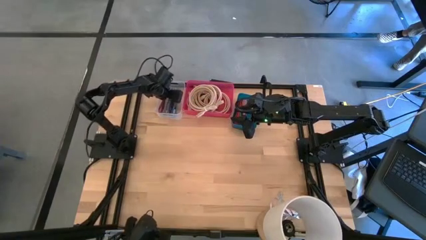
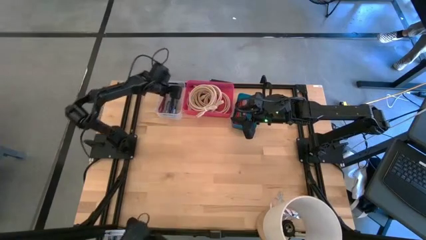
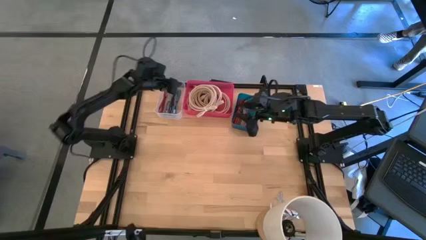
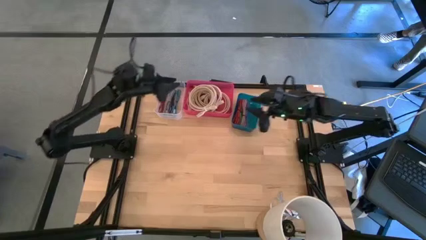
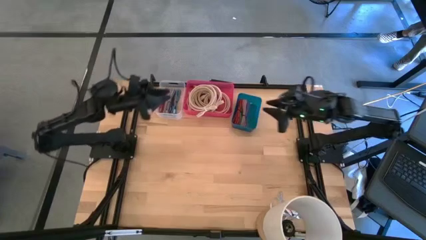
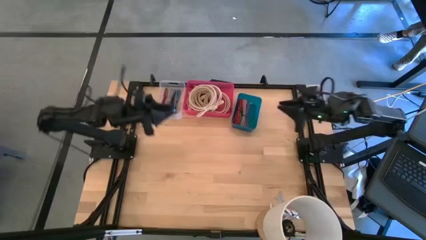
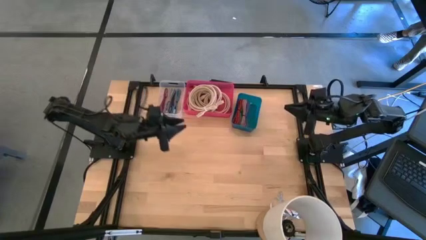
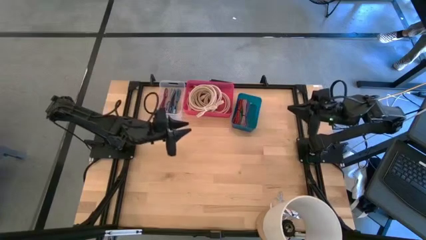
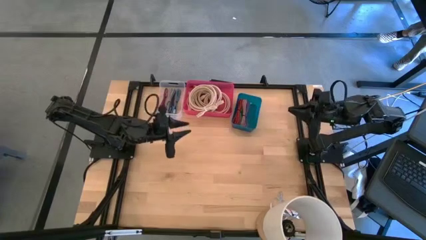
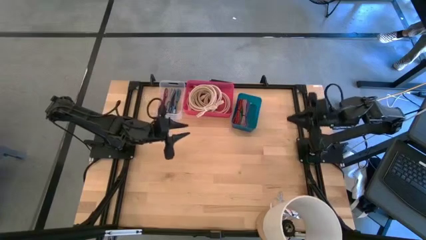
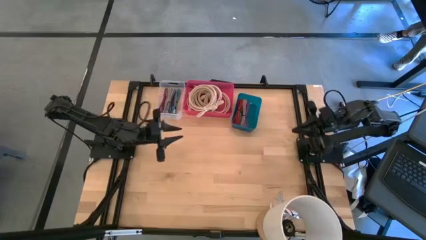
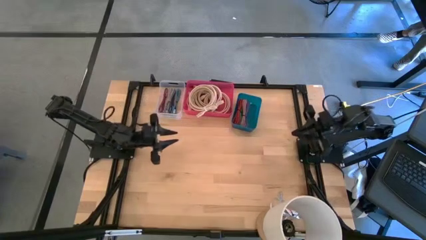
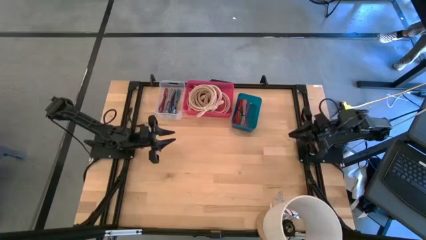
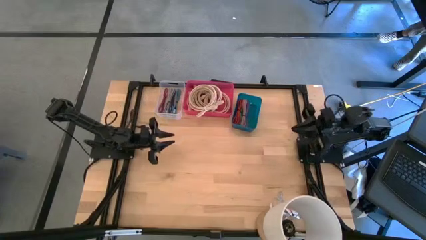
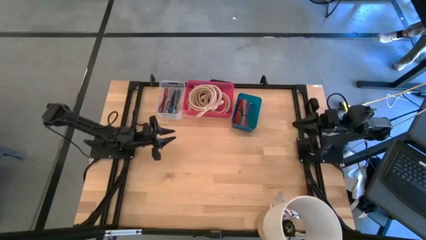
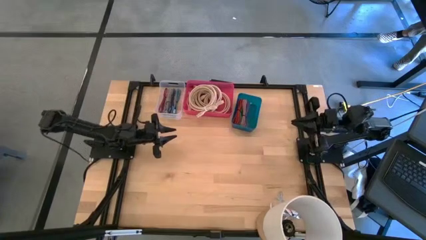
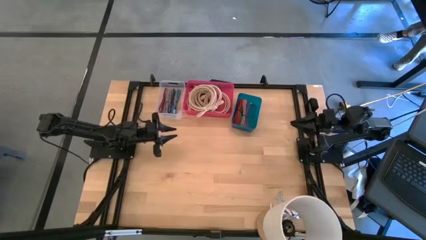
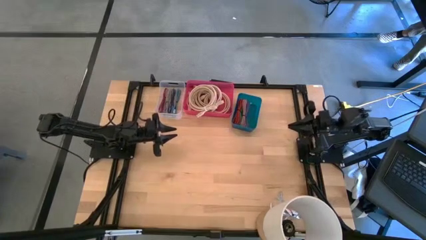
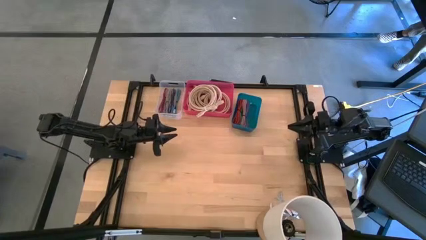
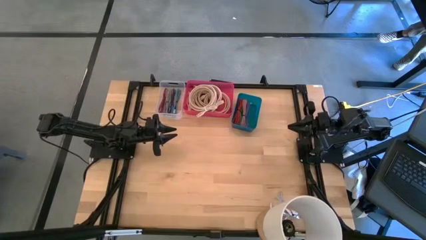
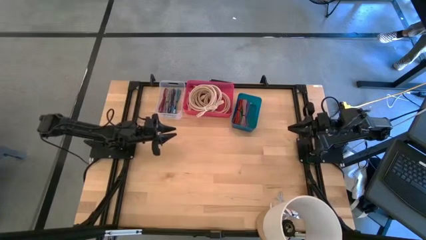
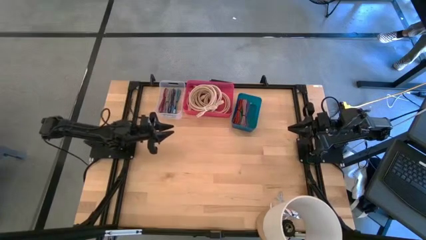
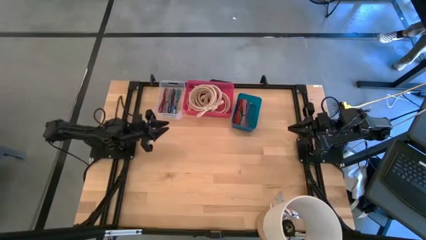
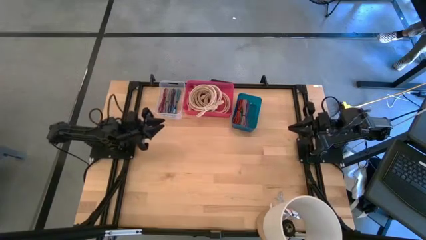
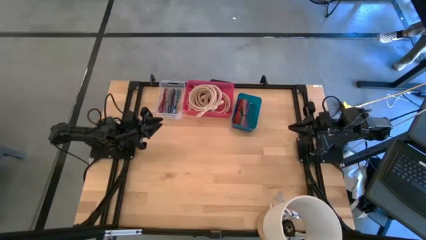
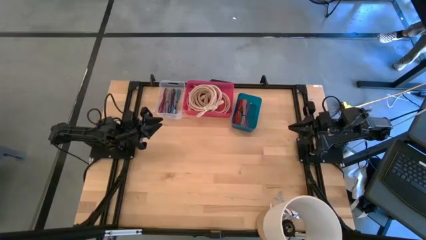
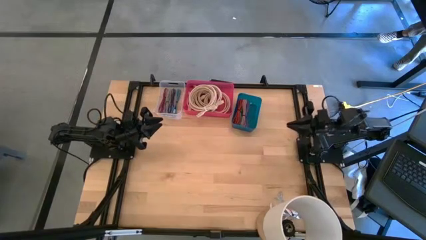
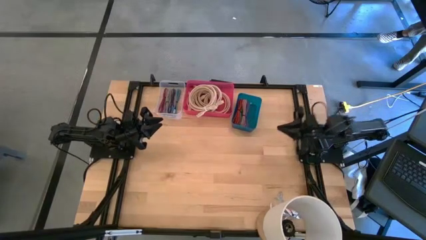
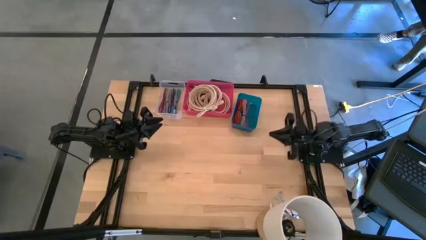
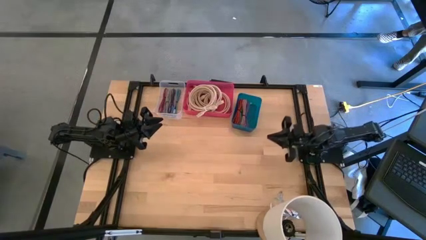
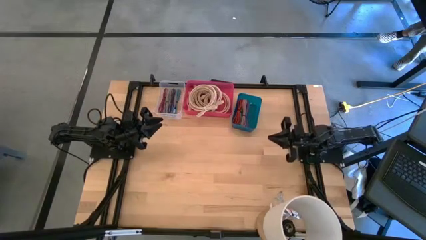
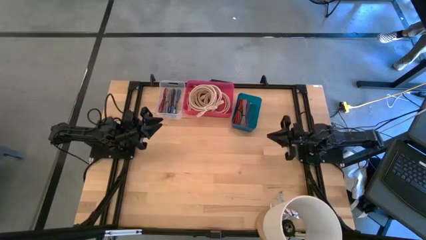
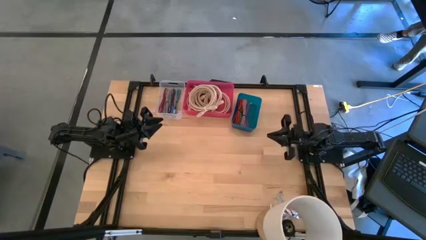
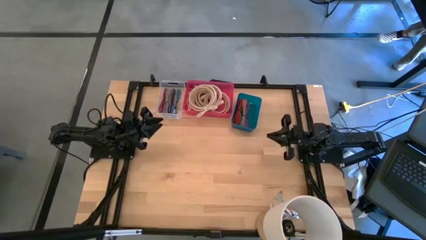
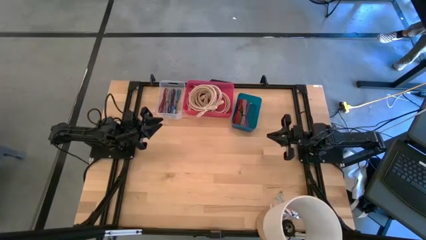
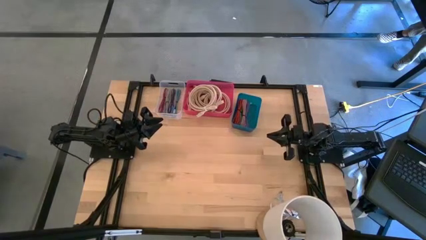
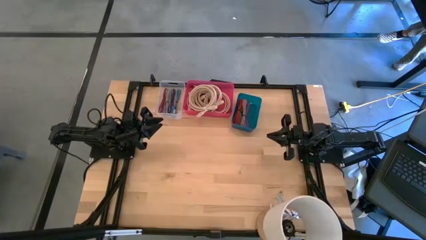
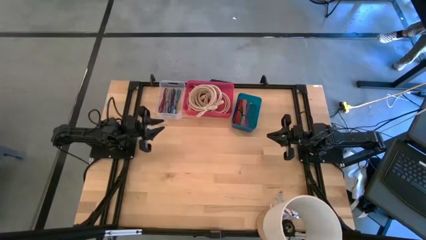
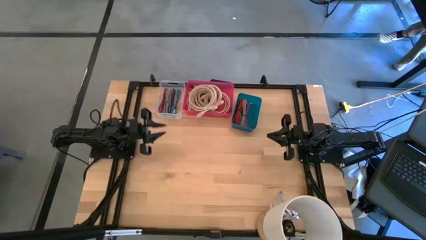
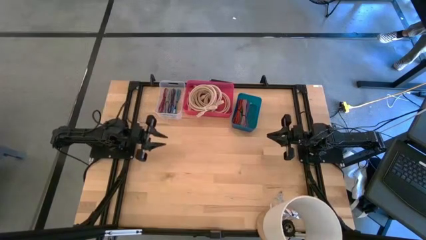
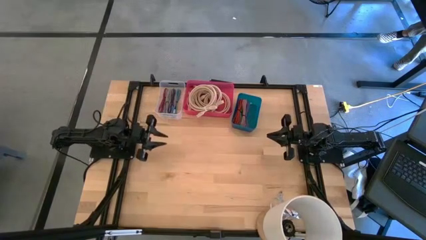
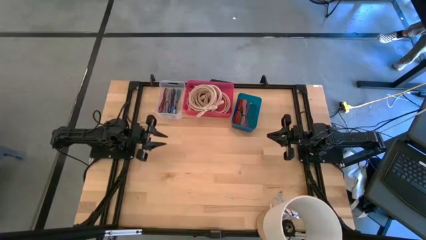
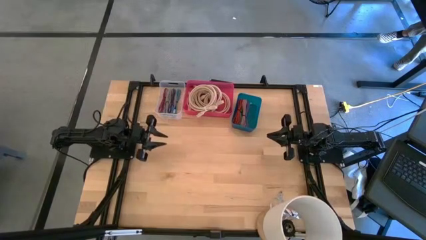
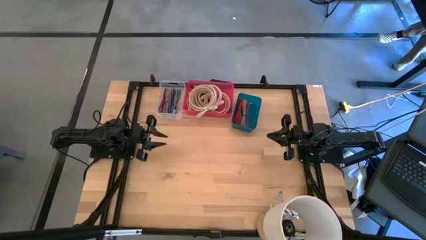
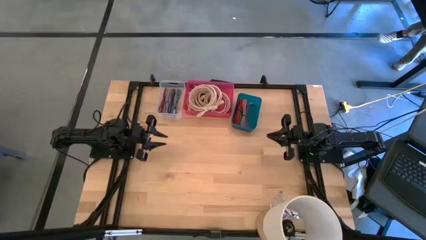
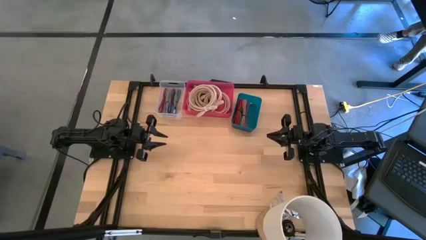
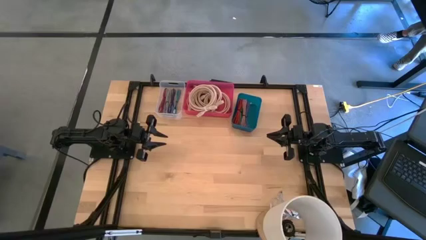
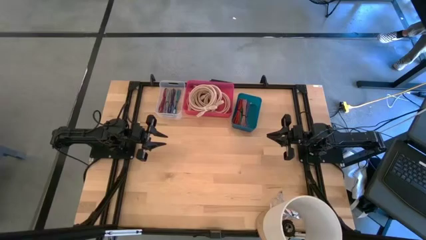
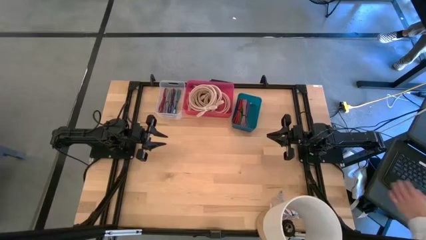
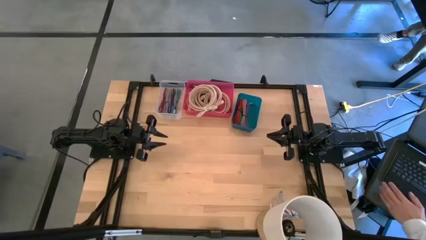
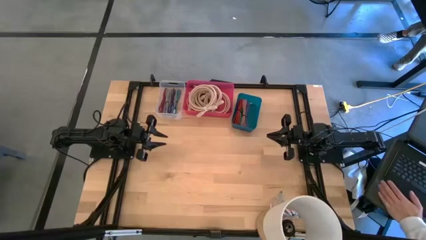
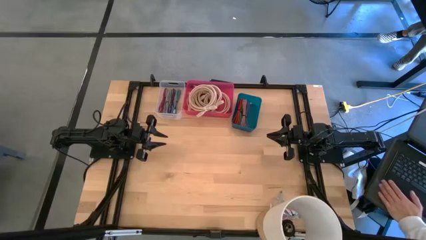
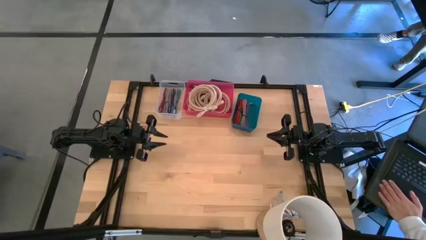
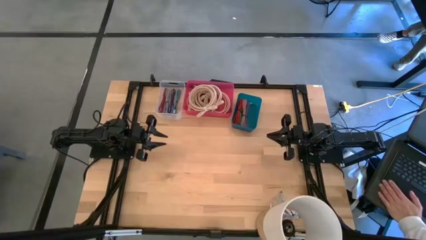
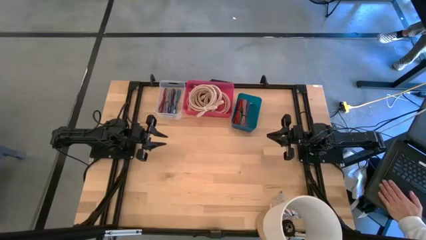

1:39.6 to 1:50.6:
Task: Pick & Place USB Port
Return to Home Position

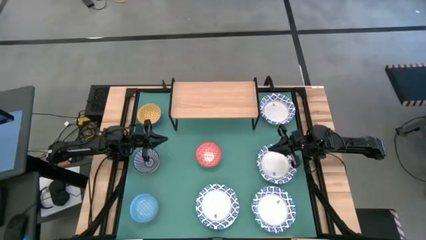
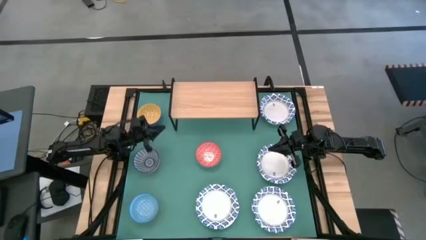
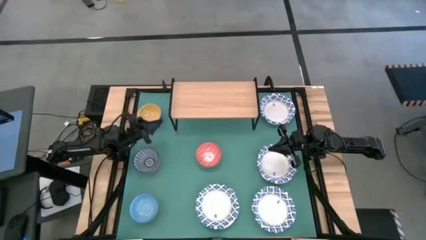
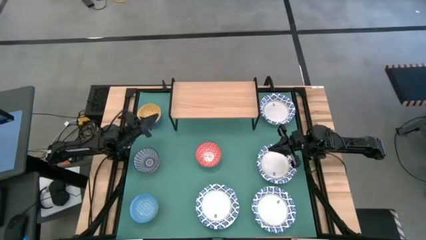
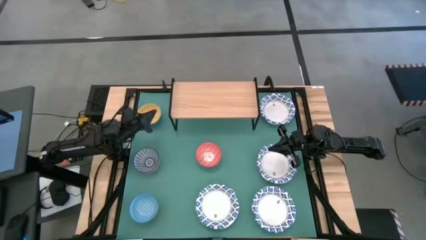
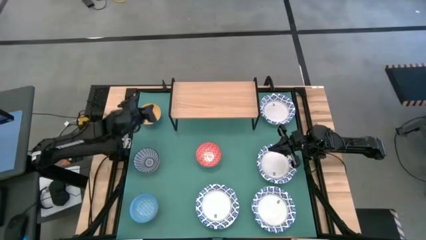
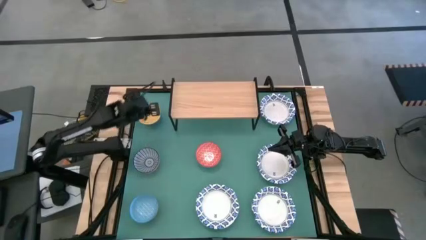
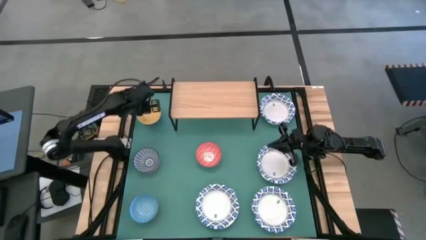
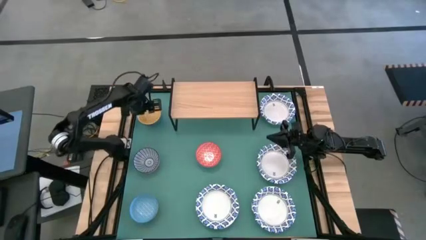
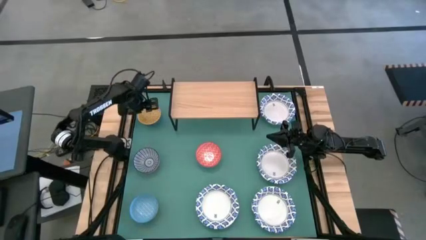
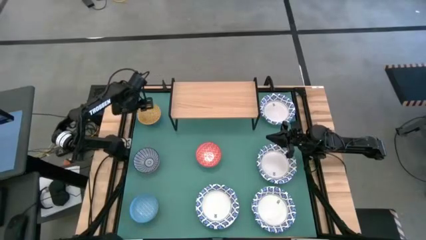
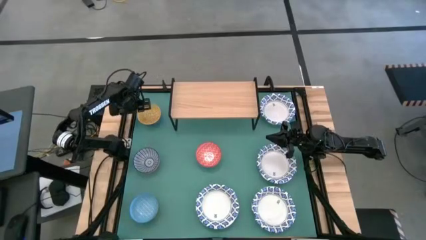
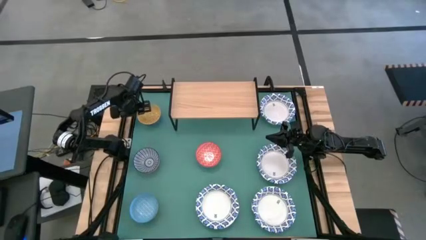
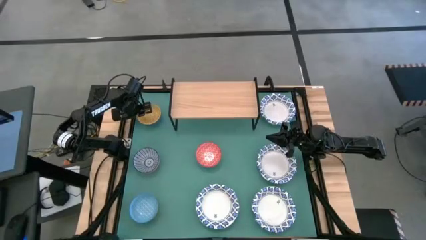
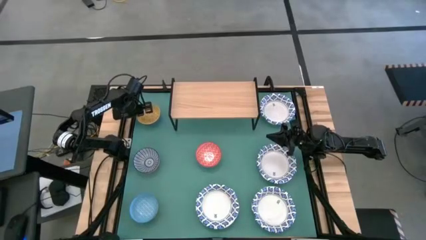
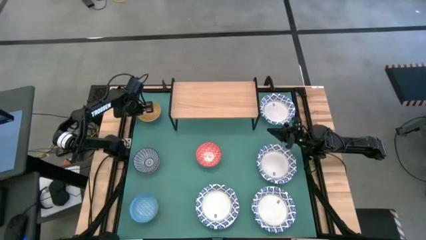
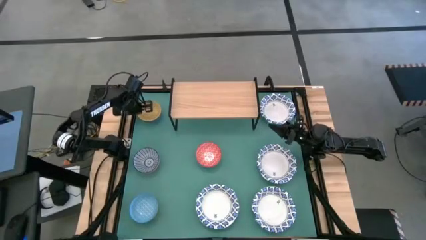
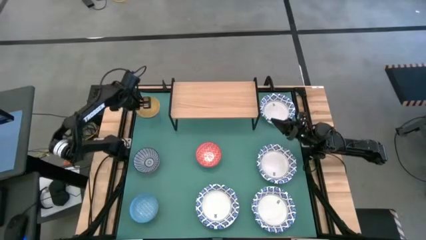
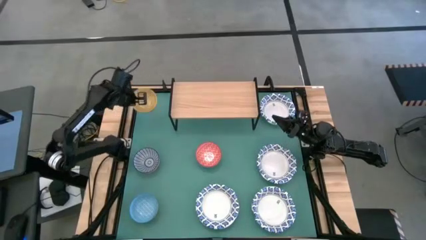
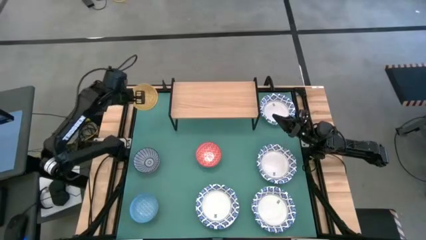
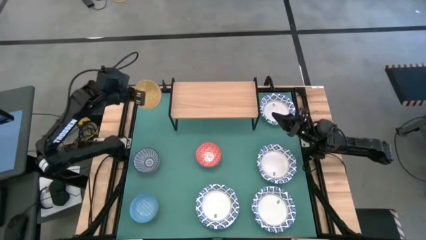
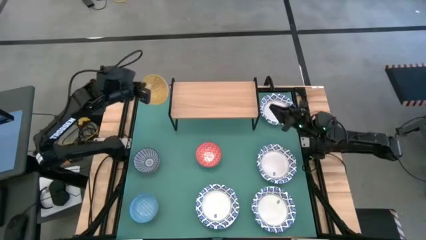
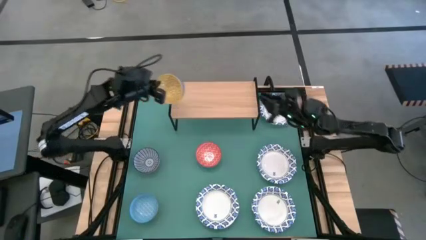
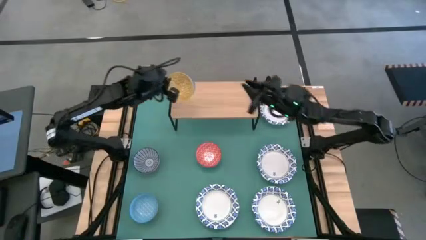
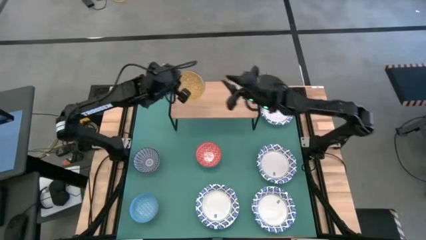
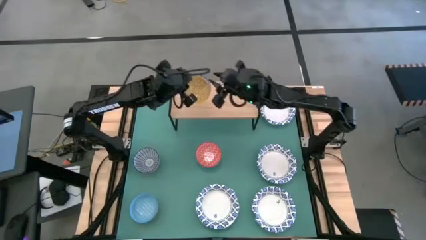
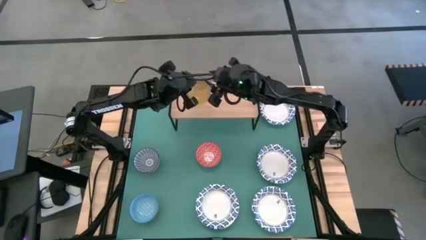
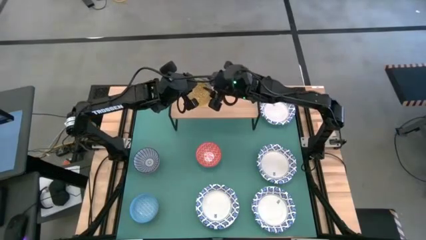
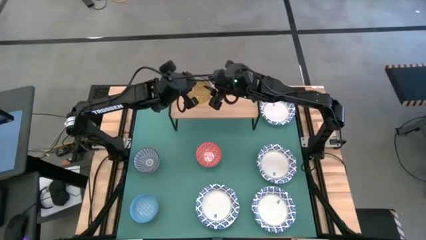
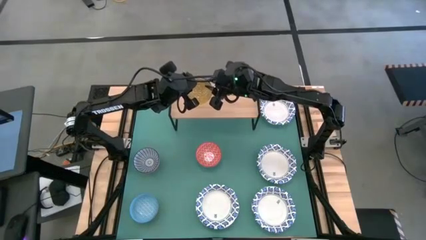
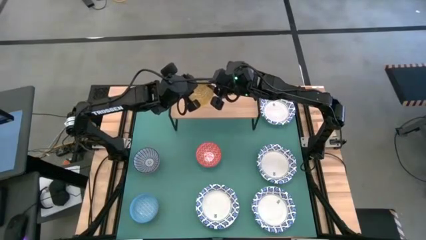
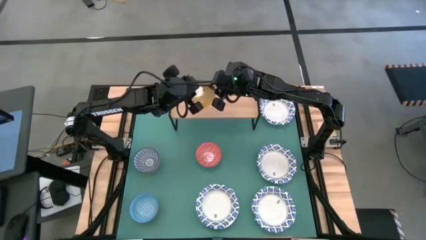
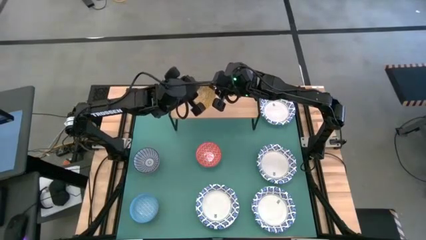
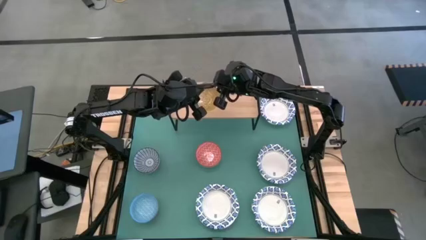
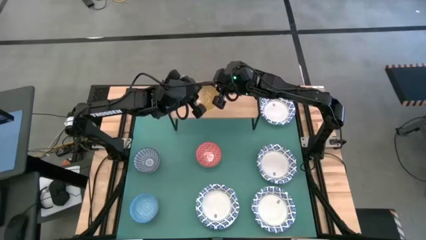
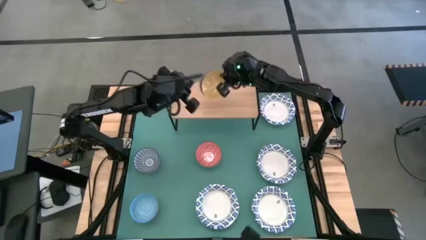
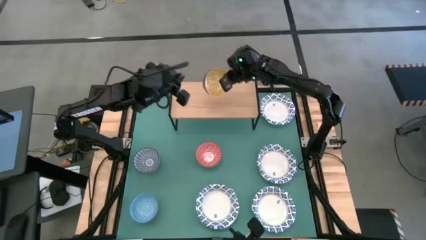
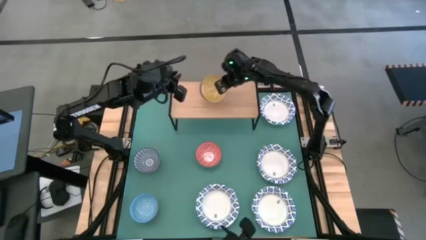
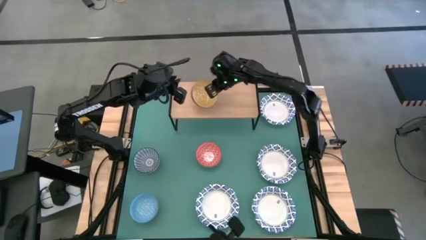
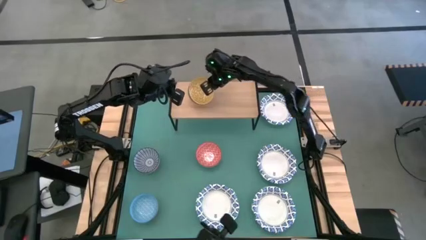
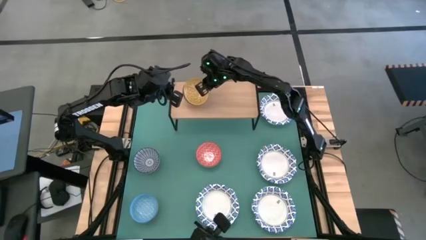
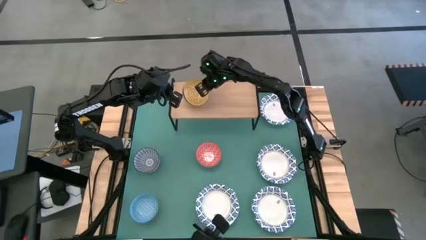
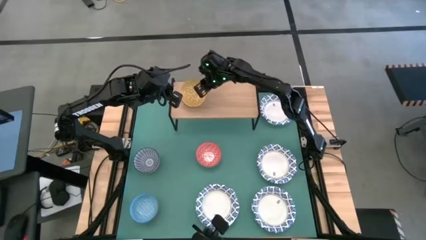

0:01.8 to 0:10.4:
Task: Place and stack bowls onto a shelf
Put the yellow bowl on the shelf
